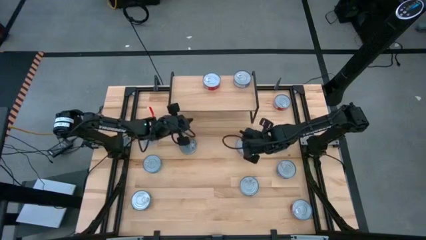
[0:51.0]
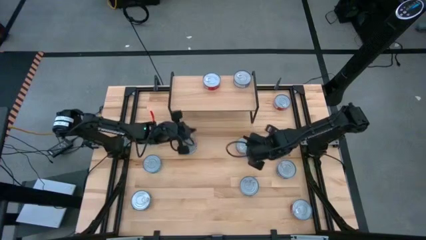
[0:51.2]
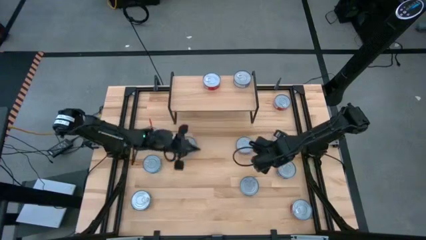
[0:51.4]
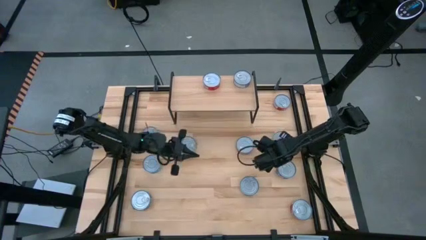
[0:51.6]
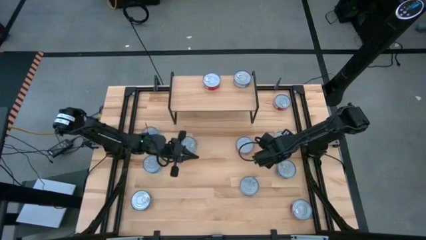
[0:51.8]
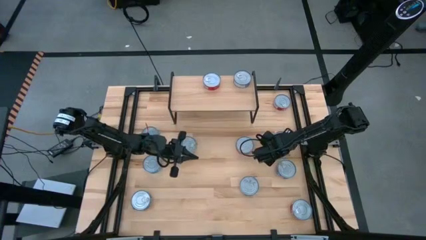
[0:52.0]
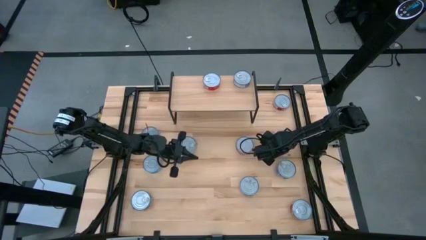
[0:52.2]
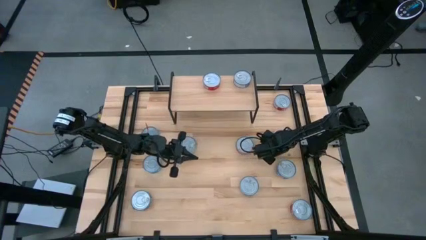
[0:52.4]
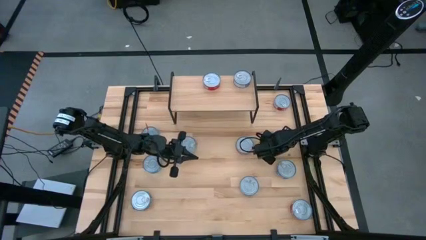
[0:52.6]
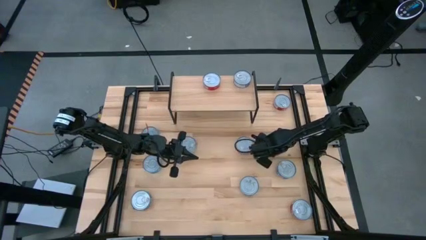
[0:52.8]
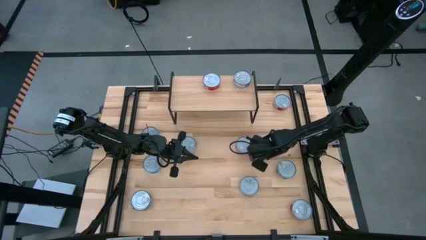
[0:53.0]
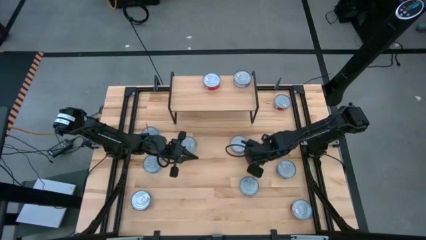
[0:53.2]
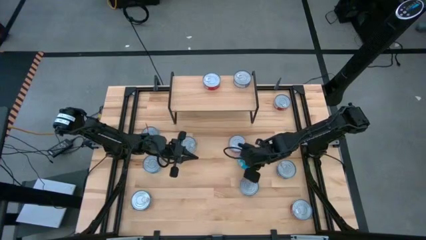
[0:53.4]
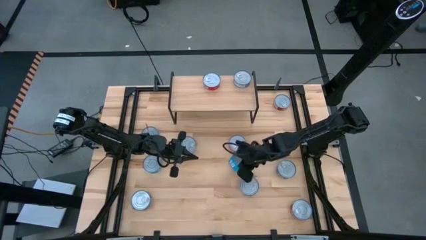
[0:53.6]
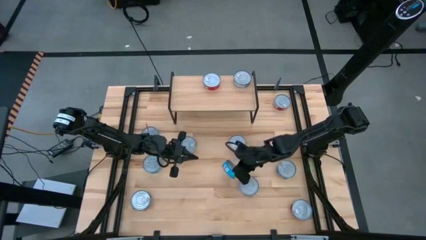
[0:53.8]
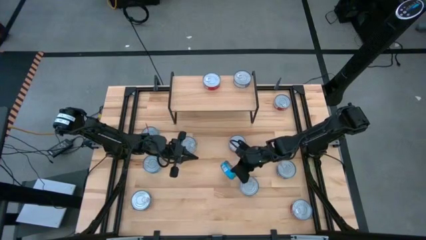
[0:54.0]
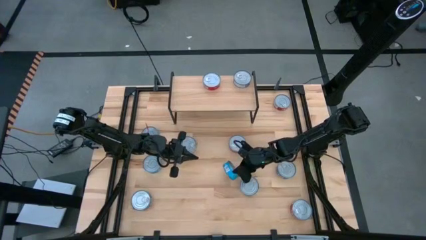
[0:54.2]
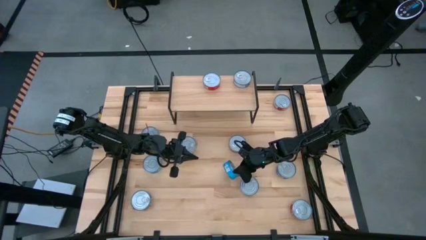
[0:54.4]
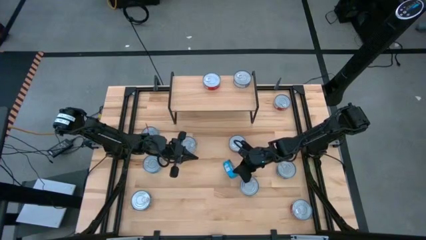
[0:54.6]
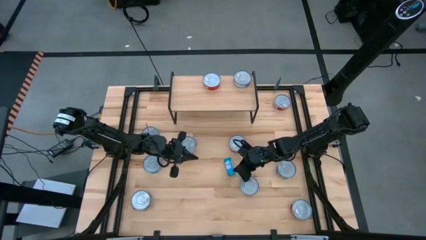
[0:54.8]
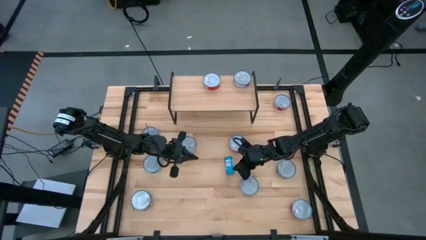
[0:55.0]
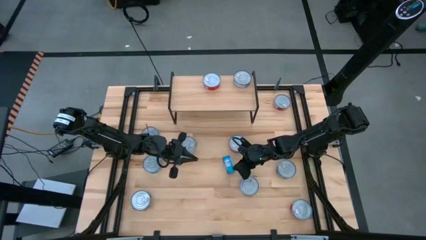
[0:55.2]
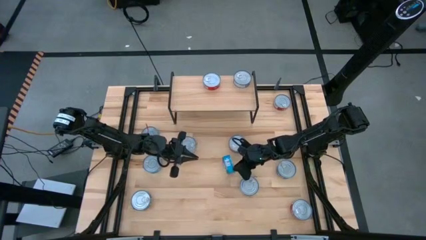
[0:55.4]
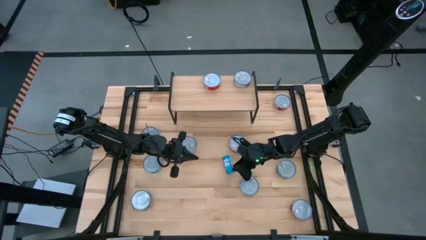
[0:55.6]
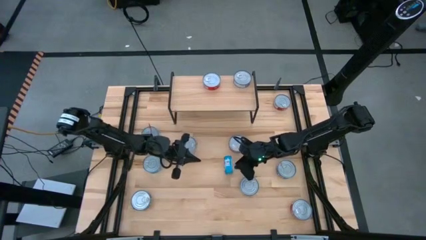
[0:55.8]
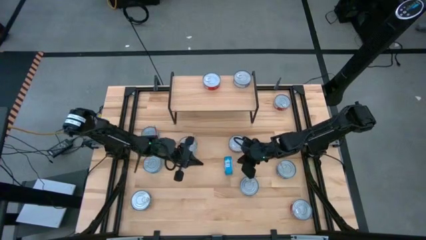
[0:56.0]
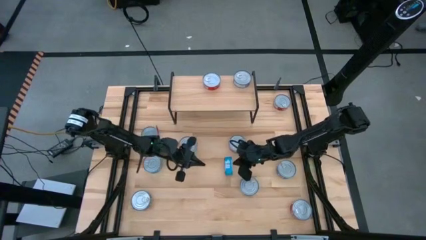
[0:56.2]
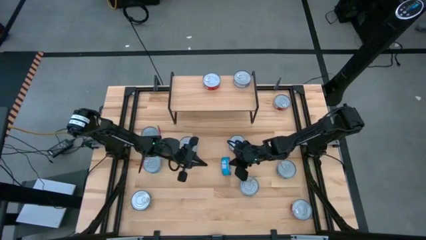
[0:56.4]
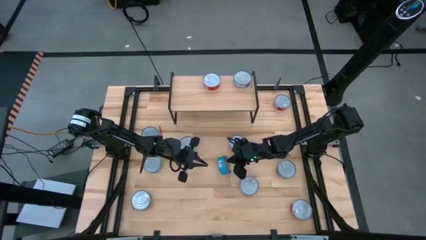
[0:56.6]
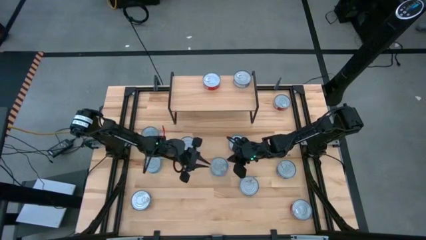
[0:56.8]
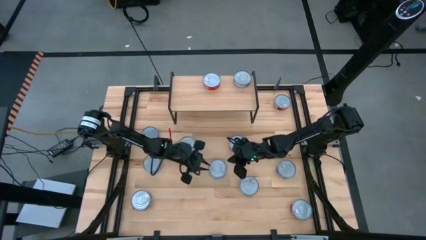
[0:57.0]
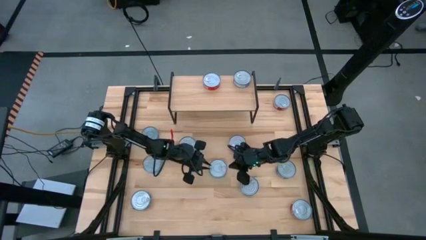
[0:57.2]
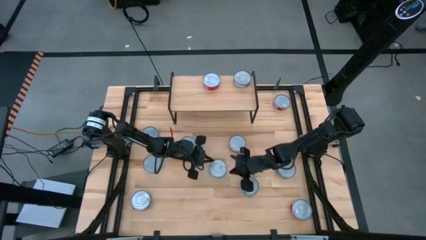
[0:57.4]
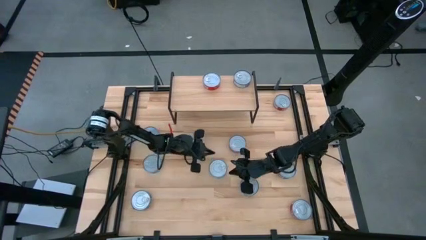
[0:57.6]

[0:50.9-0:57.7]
Task: Stack canned seafood by type on shelf
Put the yellow blue tuna can on the shelf

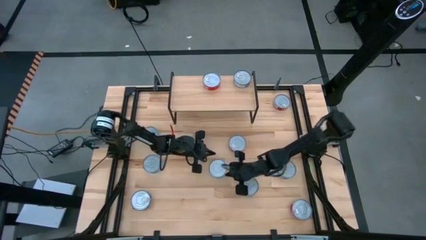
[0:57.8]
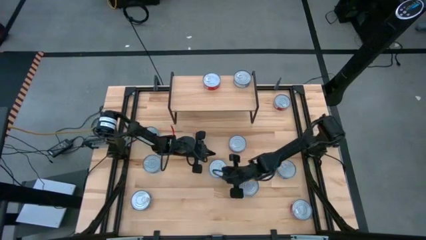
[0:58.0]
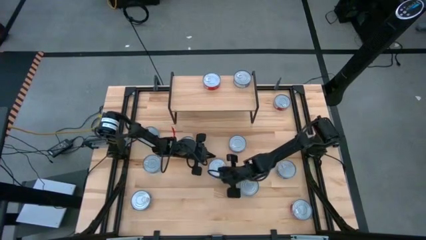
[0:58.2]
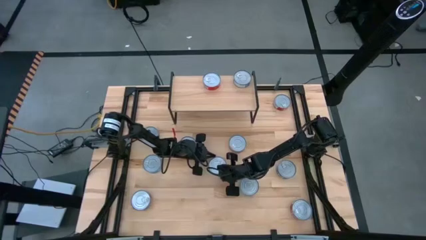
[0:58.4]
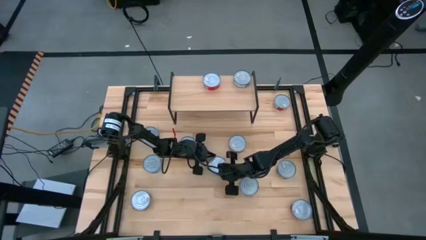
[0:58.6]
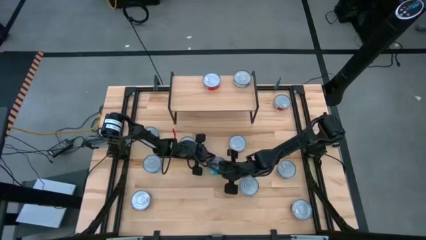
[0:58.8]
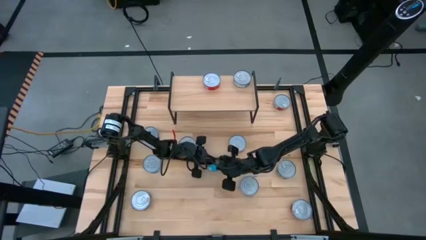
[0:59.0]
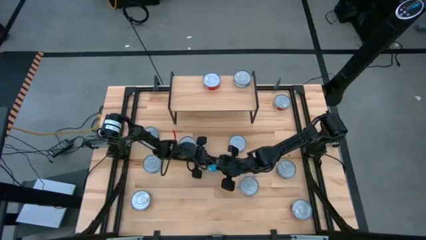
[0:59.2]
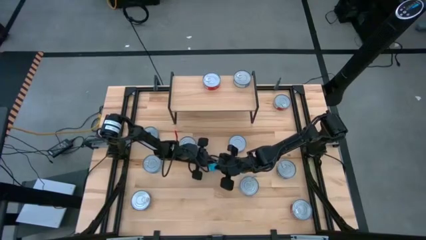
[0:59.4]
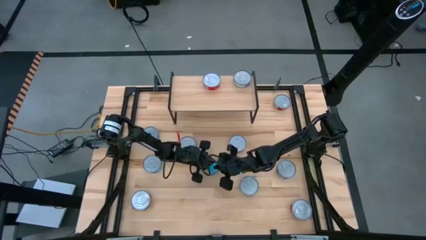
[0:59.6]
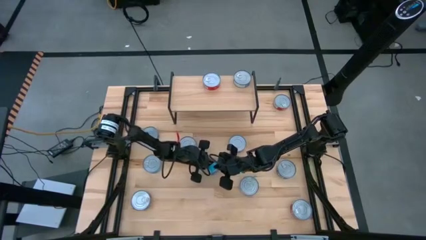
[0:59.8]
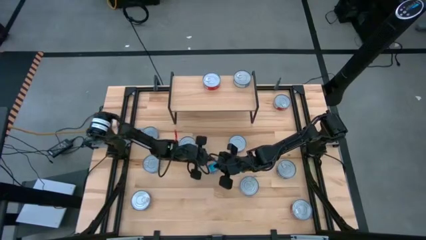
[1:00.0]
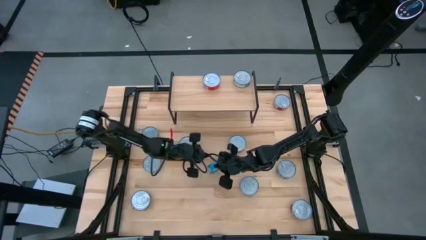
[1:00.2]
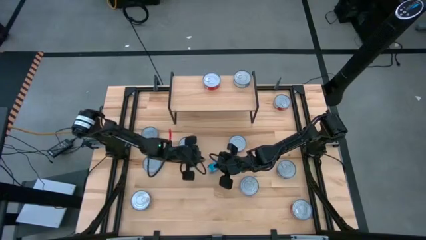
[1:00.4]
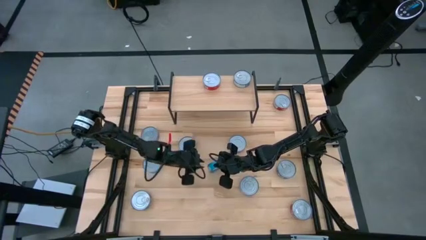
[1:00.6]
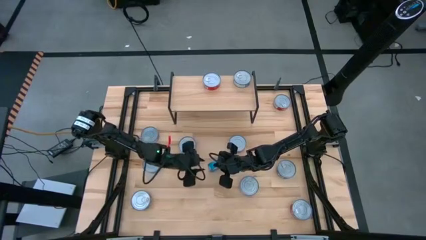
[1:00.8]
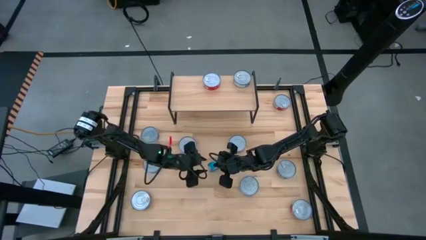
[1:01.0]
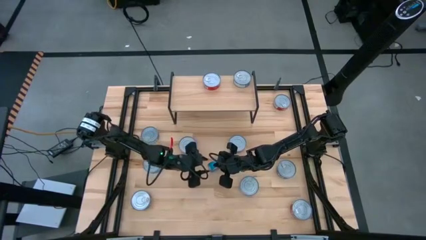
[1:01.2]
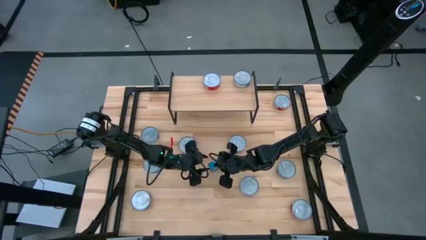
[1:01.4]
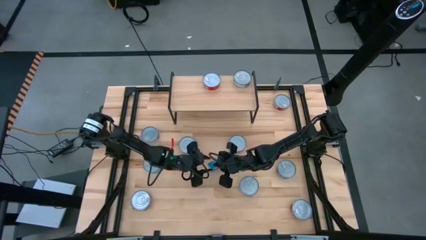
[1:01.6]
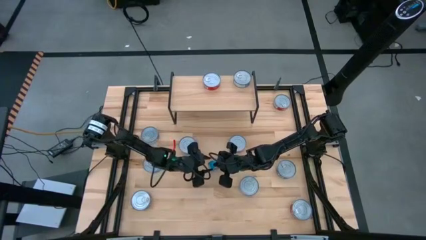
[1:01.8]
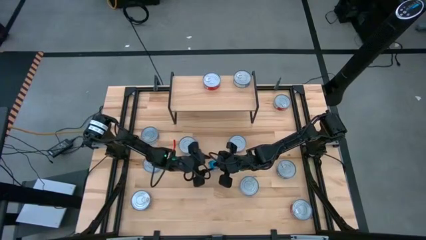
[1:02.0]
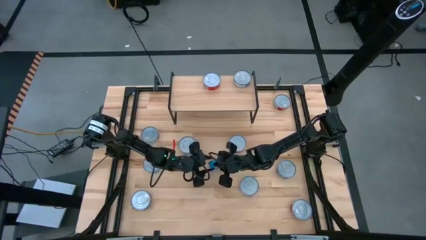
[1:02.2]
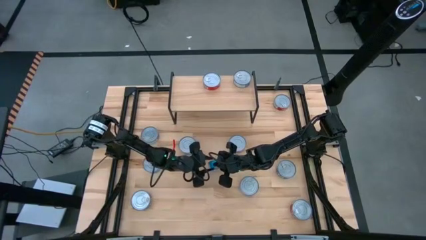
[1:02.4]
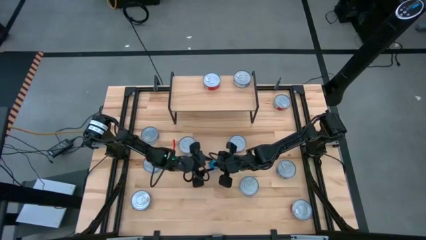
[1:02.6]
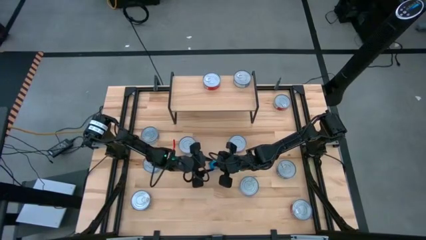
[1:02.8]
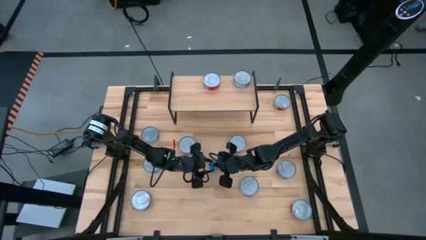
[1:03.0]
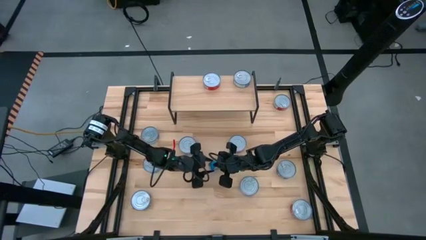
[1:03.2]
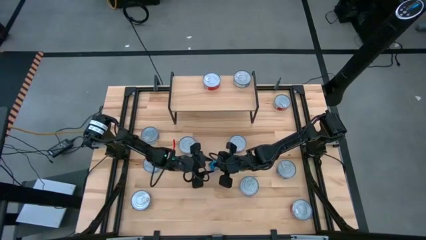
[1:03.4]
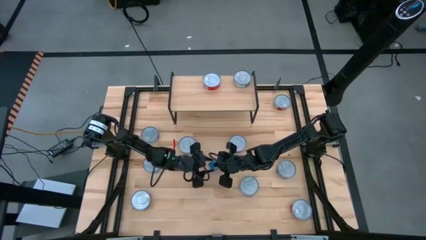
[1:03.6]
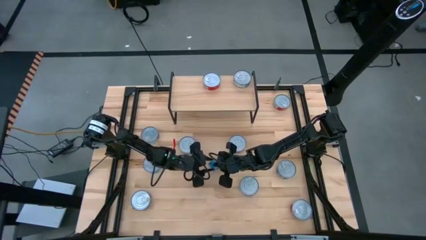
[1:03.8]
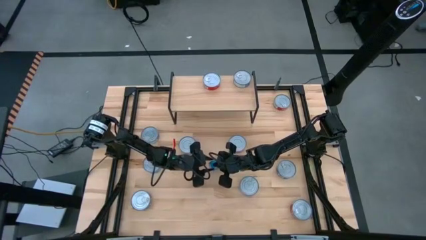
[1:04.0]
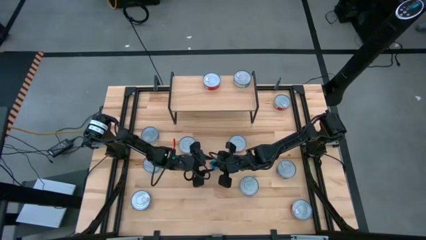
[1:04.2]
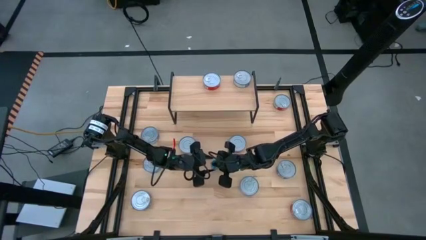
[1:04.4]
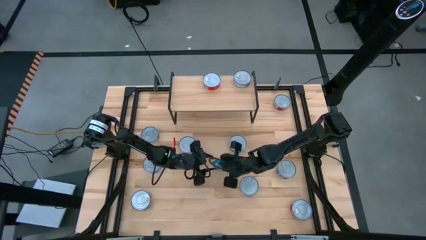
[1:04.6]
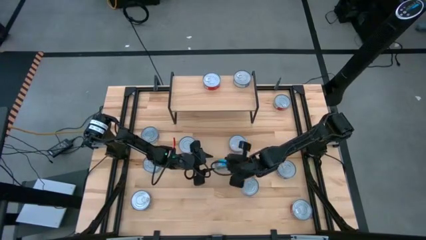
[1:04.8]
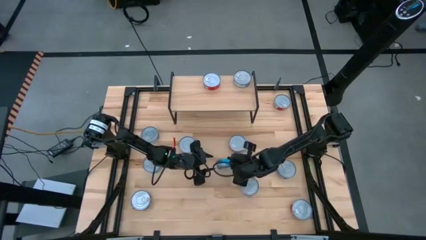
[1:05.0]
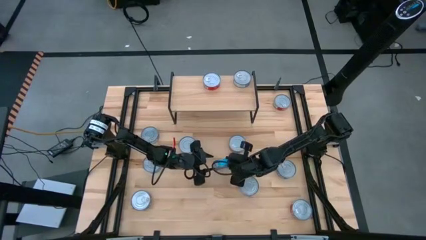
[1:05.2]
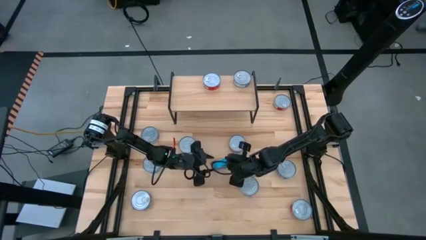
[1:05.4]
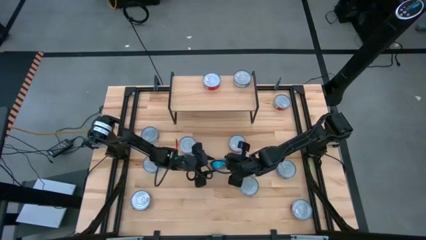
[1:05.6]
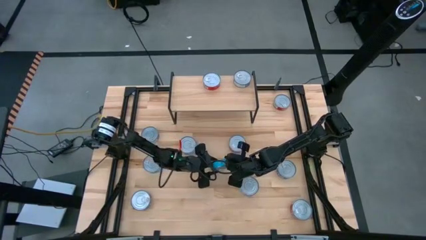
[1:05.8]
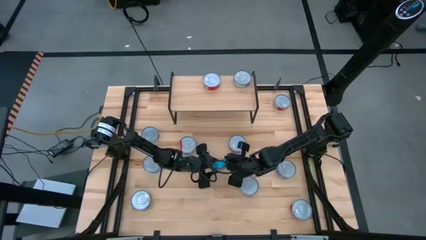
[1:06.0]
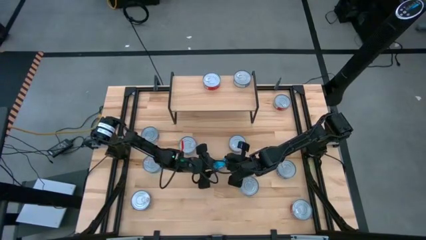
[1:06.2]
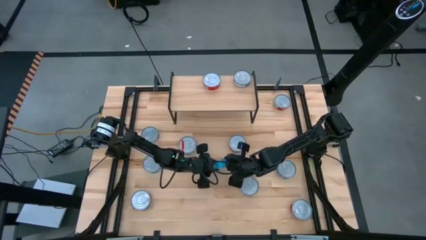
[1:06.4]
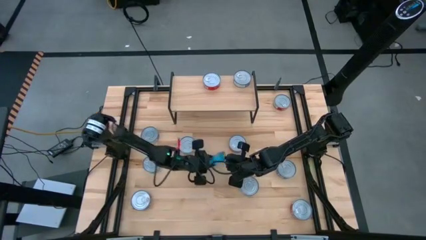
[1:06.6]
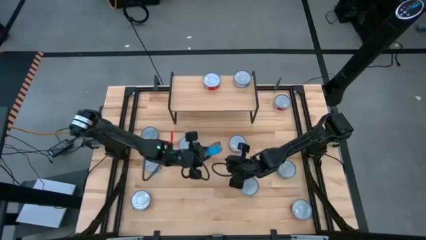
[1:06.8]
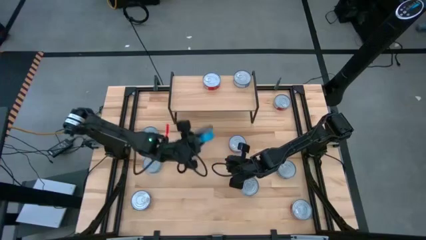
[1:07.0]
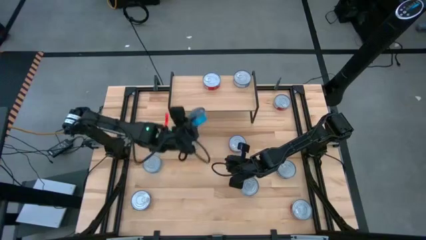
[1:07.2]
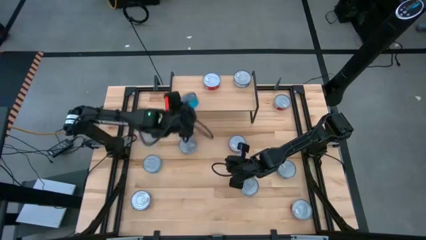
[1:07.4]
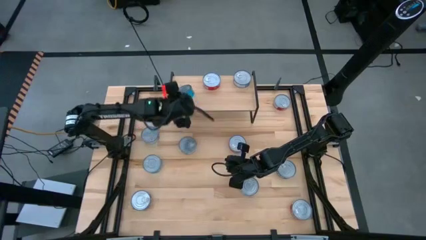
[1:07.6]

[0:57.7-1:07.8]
Put the yellow blue tuna can on the shelf
